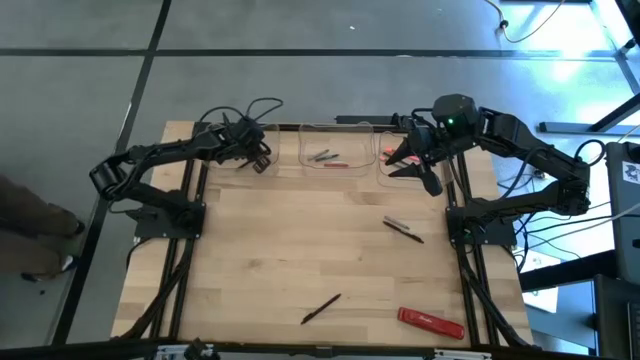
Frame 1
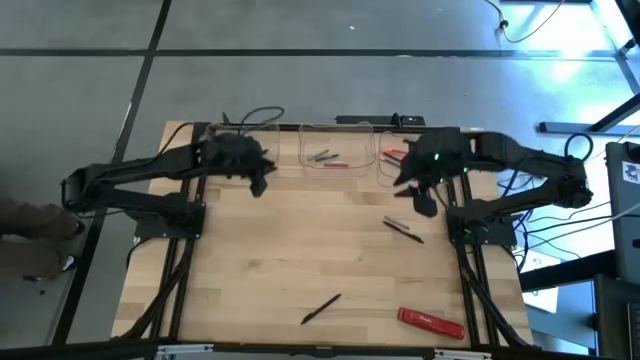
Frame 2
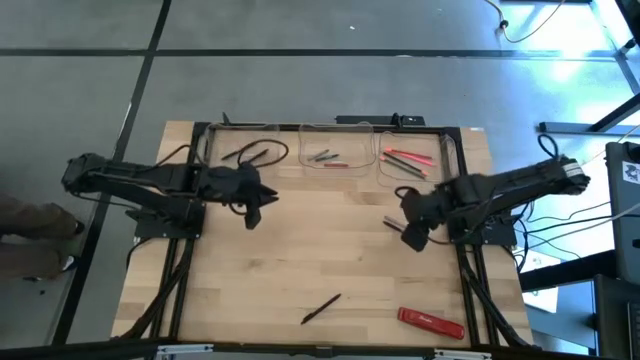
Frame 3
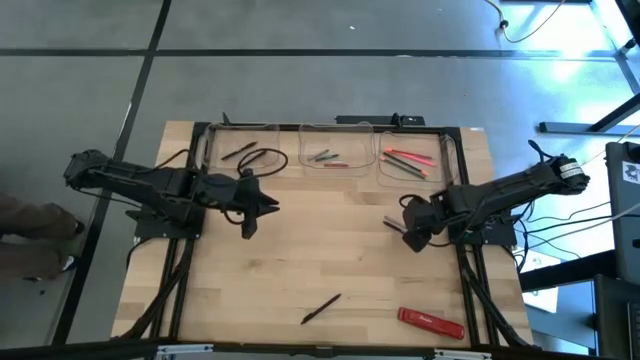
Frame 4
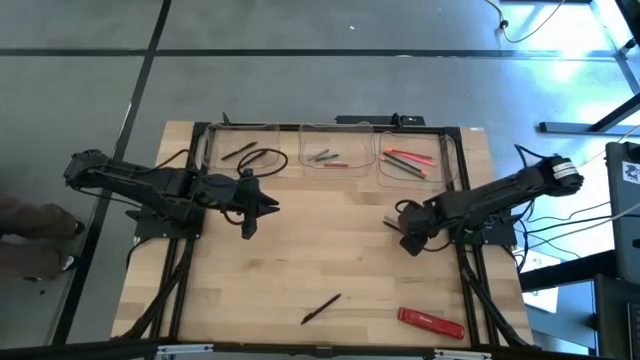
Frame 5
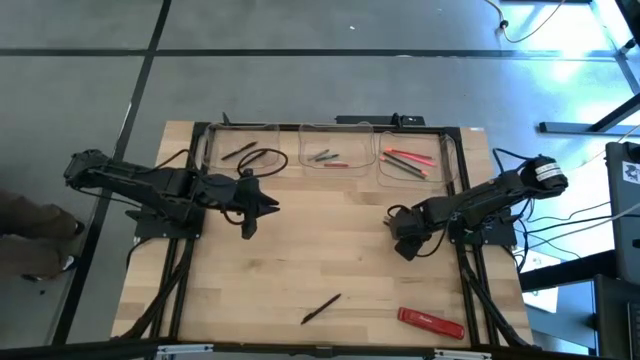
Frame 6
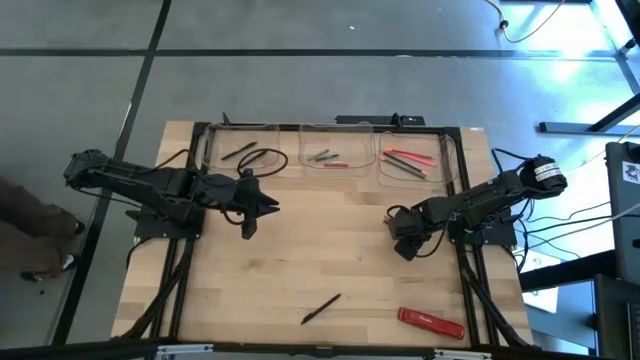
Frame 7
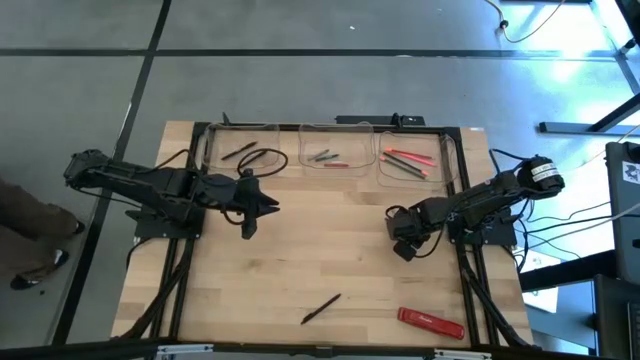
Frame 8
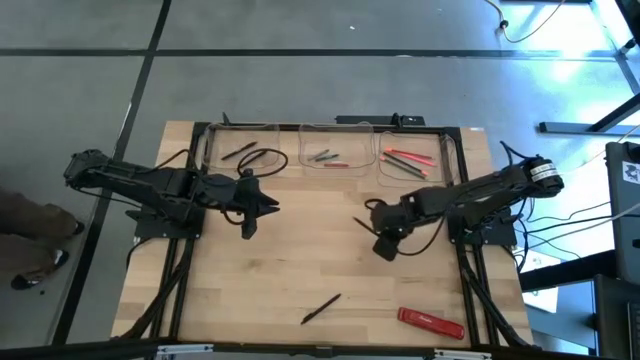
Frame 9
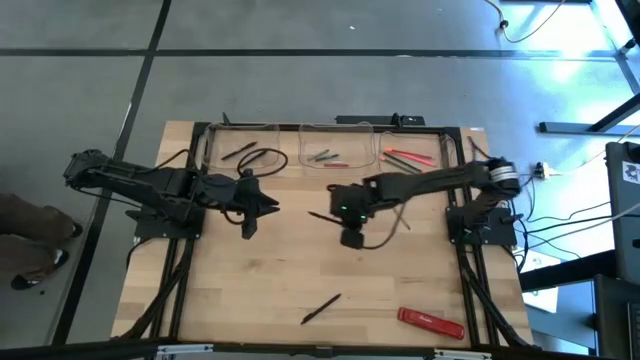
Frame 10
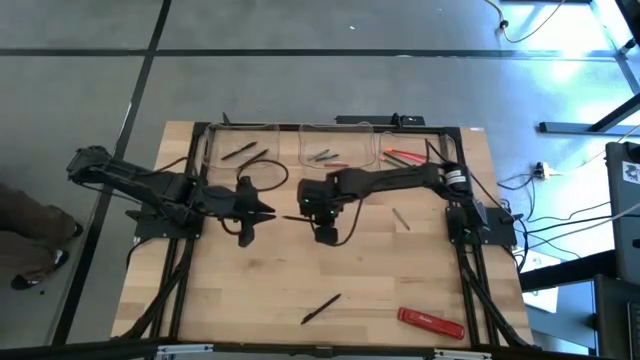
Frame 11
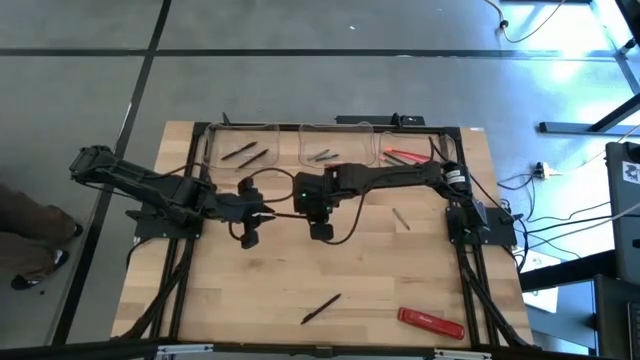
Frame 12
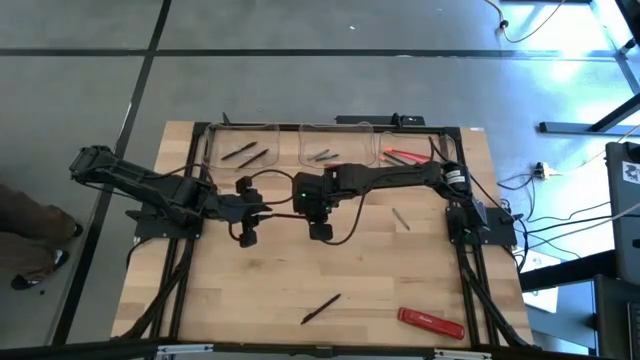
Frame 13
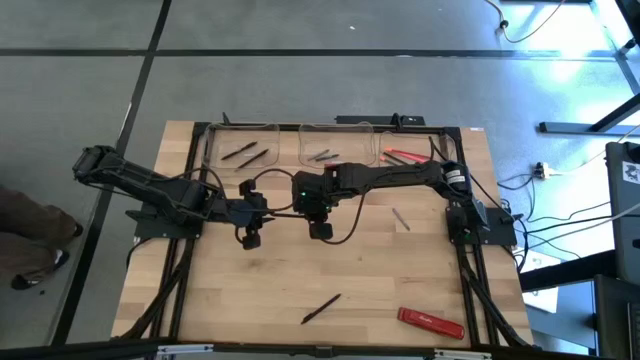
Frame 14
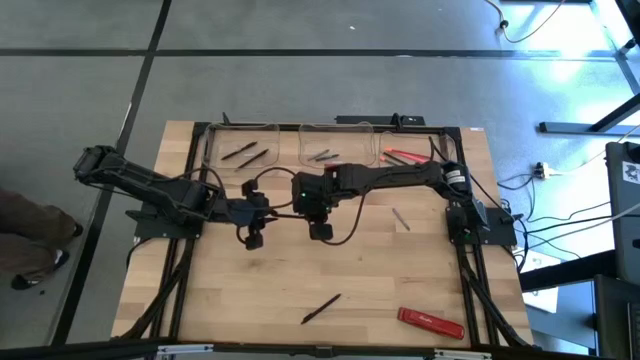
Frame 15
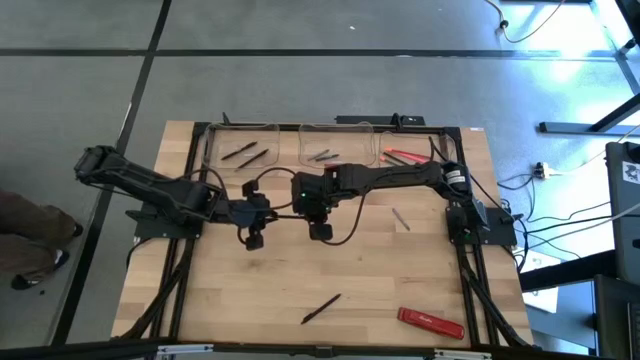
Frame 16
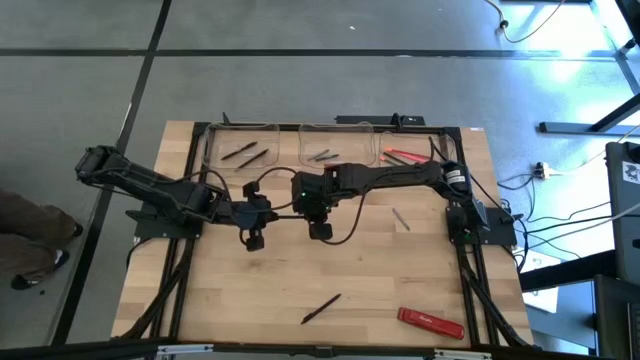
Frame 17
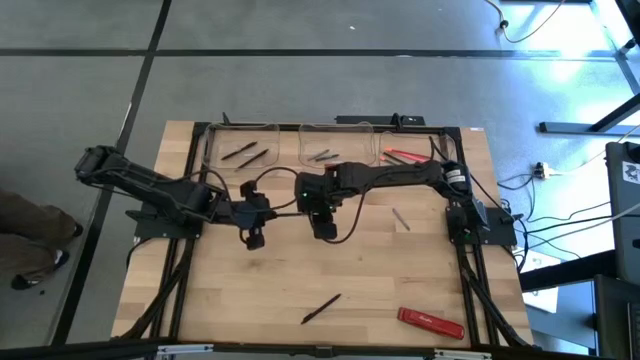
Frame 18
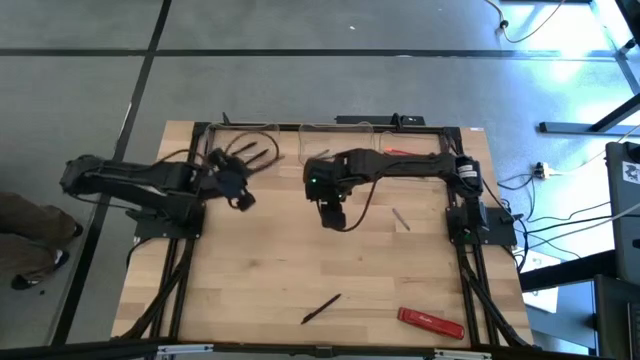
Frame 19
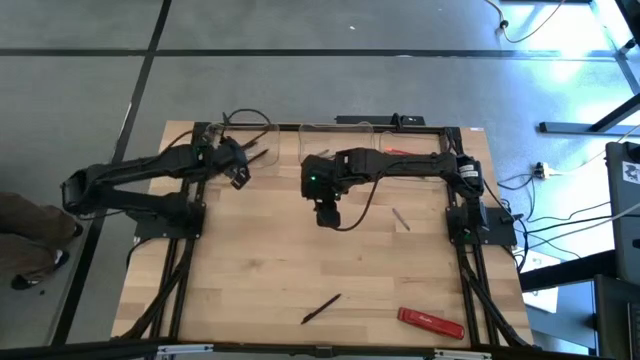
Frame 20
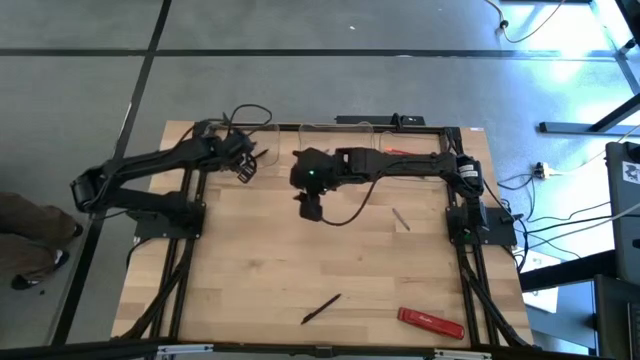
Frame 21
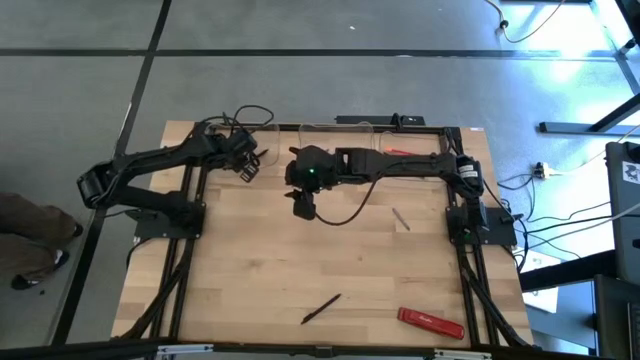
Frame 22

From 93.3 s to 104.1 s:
Task: Sort crayons/erasers/pens/pencils in bins
Put the black pen into the left transparent bin

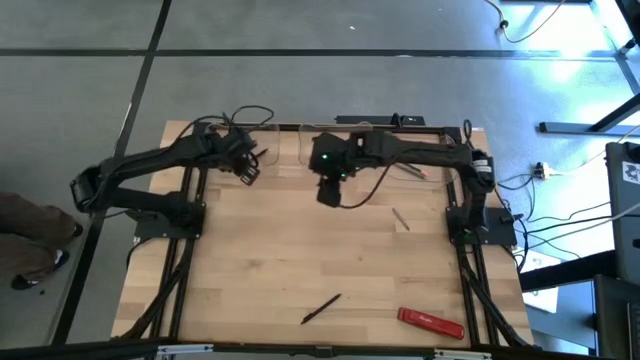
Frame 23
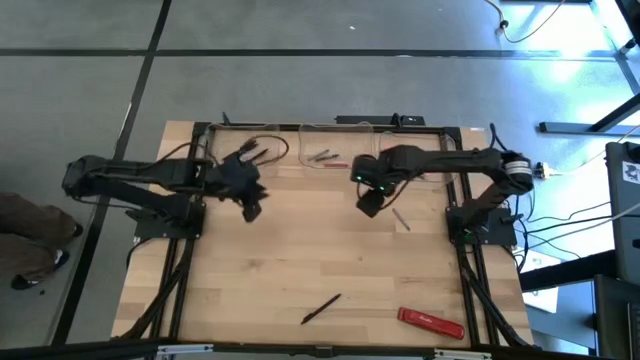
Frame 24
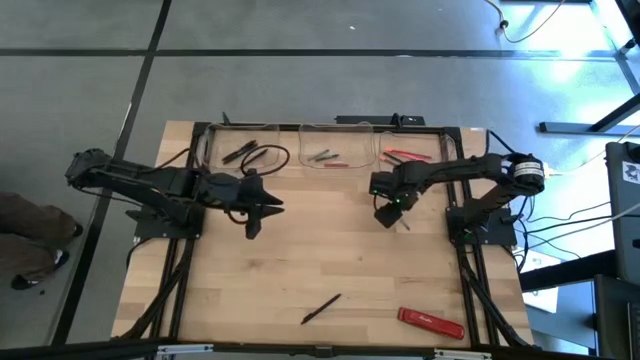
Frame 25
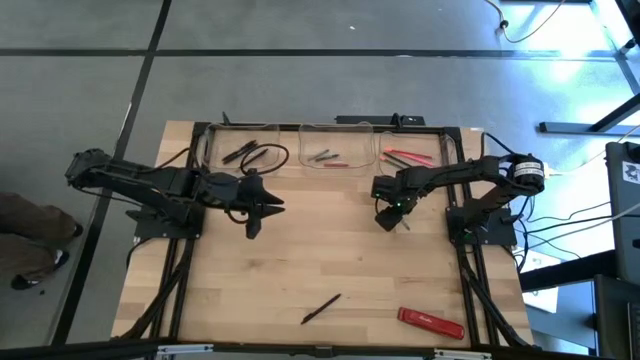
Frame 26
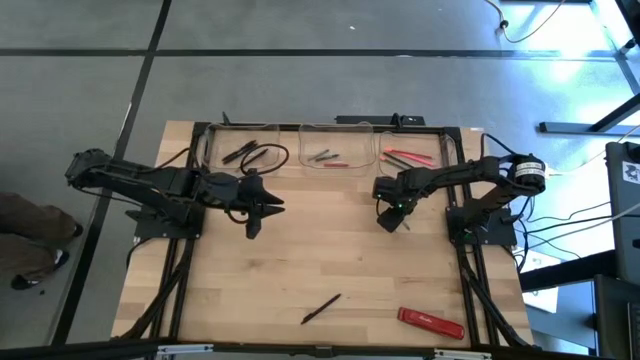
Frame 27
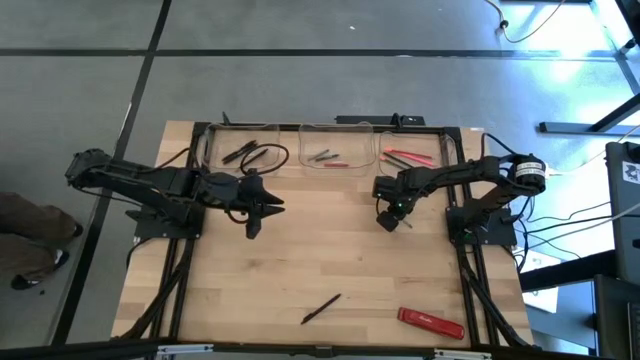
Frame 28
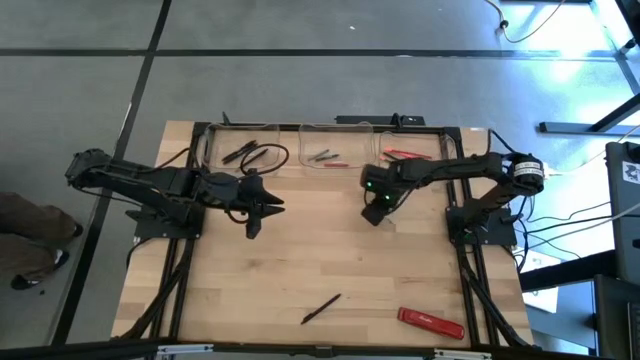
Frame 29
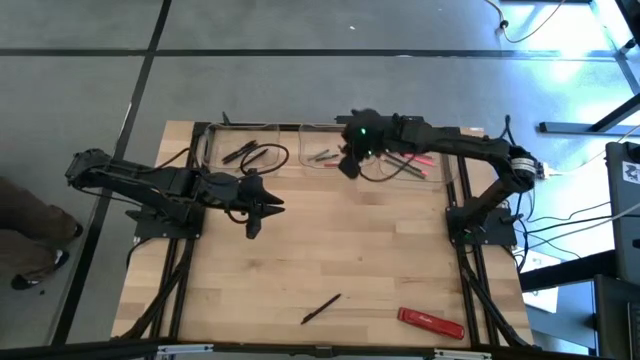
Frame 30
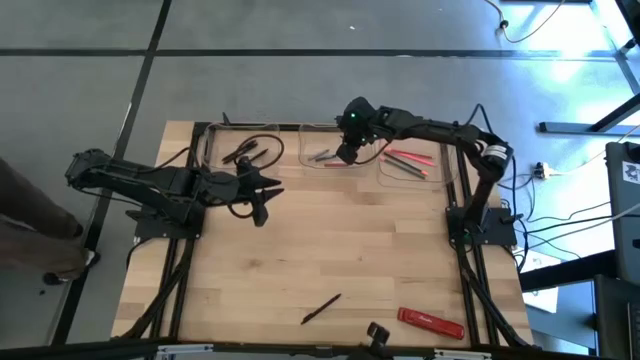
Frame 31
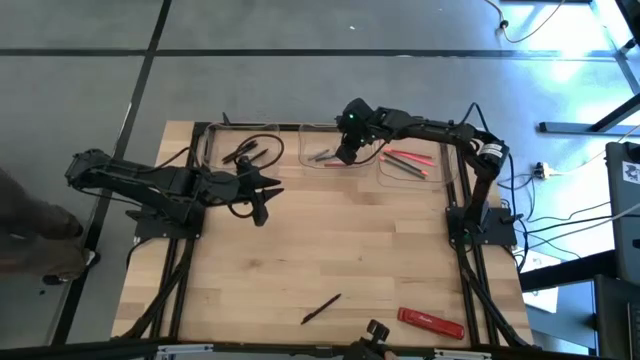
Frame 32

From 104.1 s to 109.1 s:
Put the gray crayon into the center transparent bin

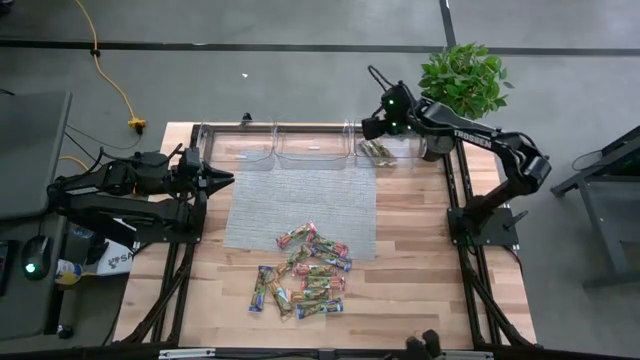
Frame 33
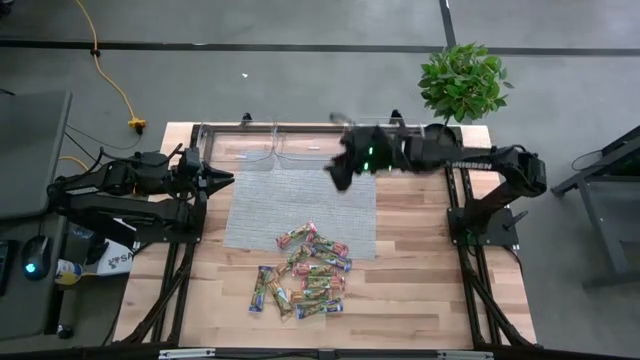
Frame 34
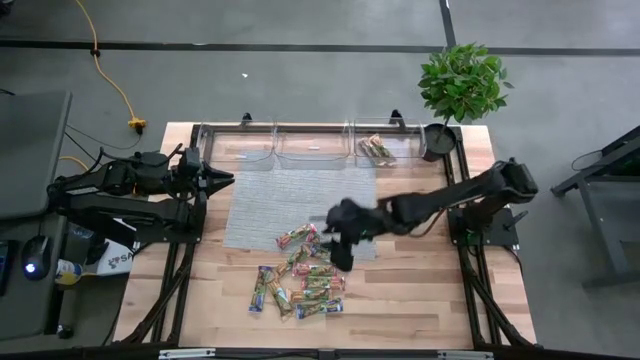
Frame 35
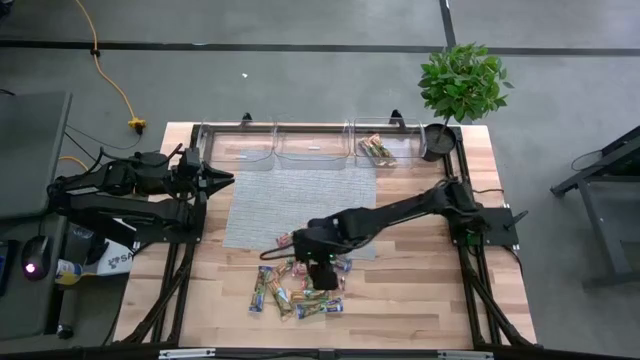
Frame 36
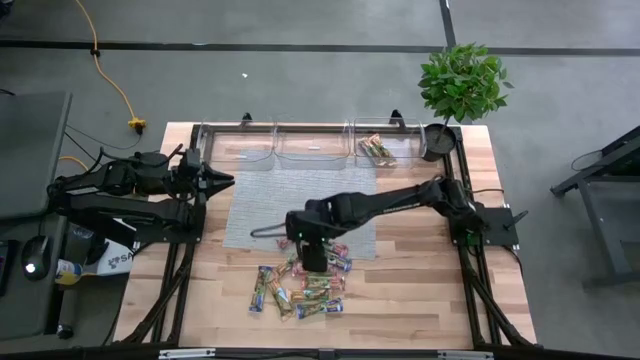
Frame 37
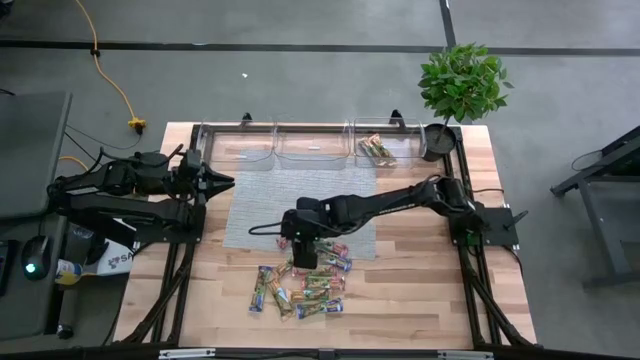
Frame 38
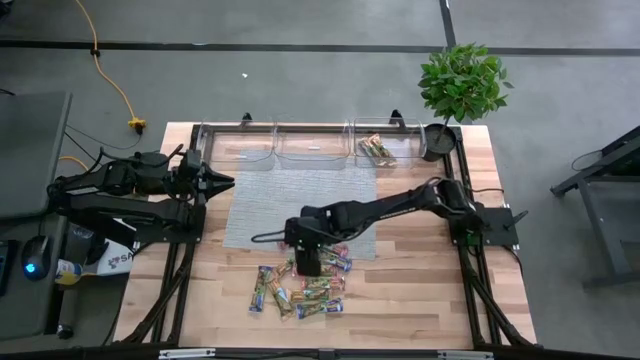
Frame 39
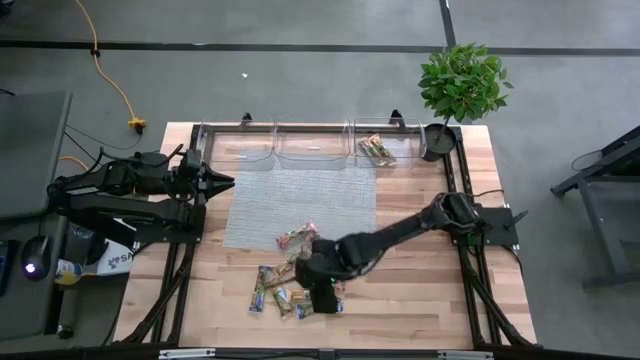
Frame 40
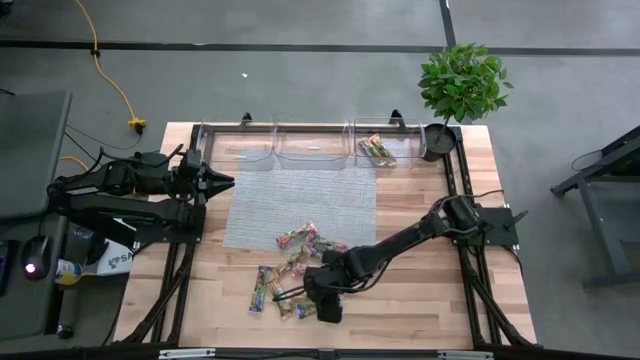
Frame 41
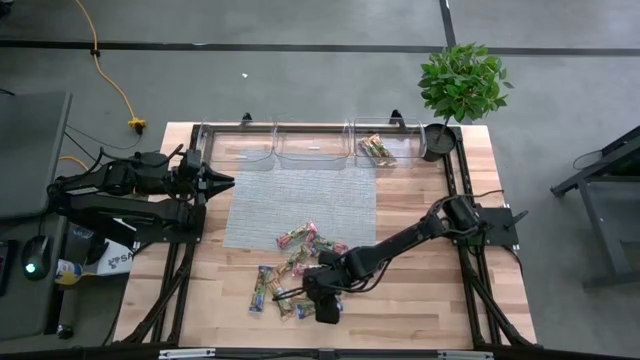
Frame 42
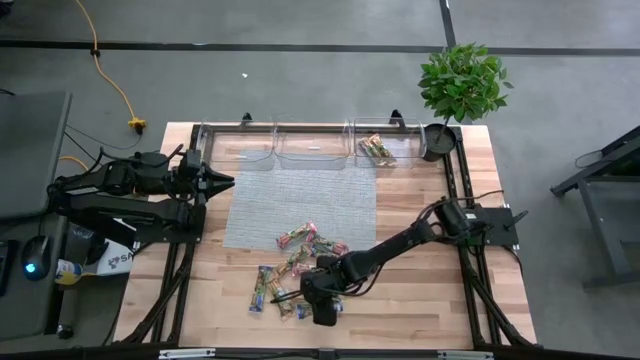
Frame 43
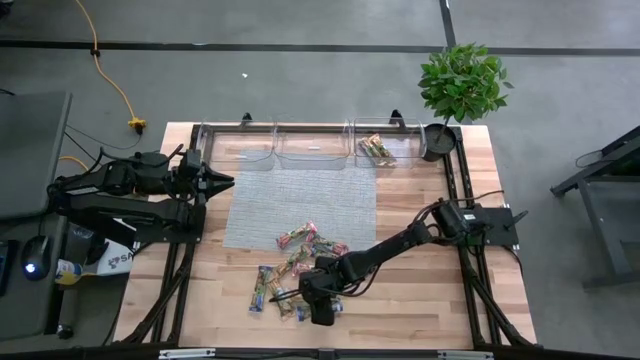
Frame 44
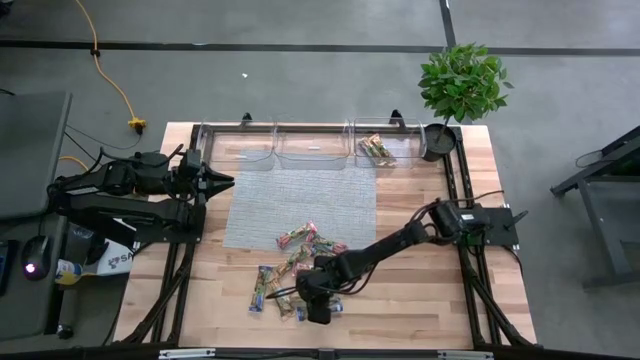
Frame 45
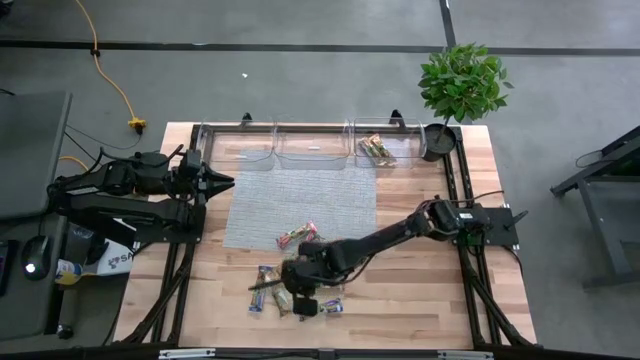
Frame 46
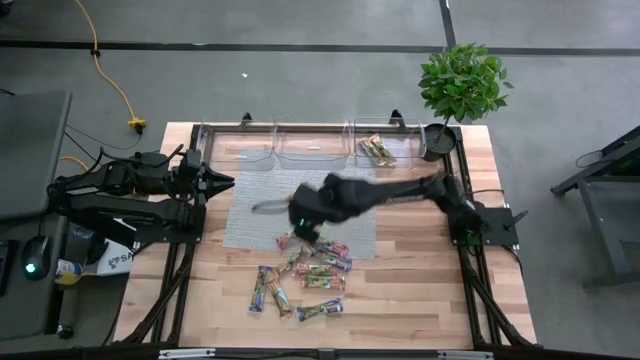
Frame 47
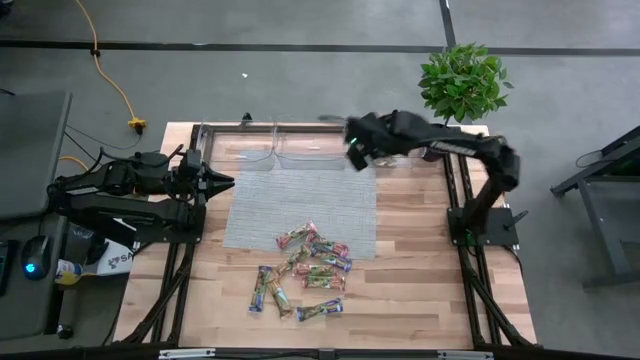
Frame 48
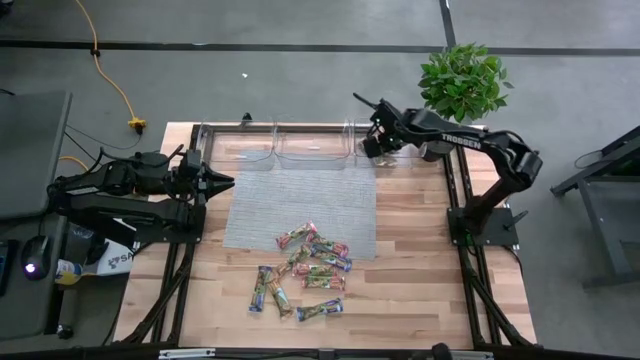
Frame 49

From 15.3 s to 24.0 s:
Task: Pick and place Granola Bars by type
Put the yellow granola bar into the right transparent bin
